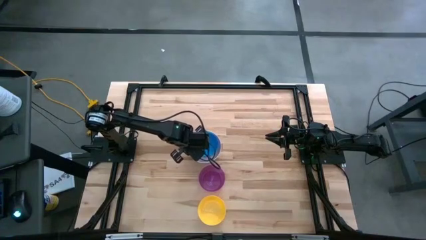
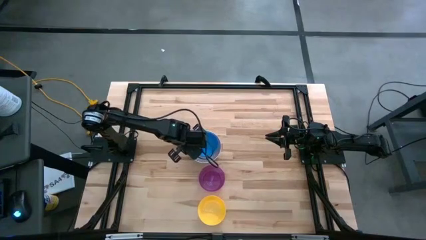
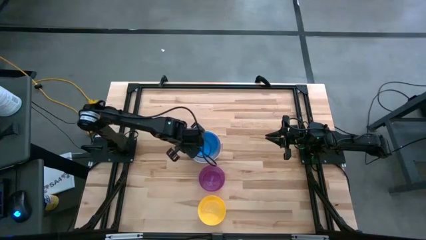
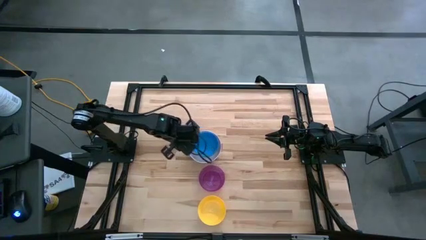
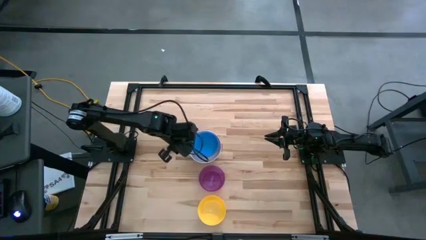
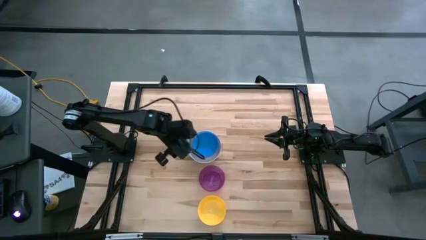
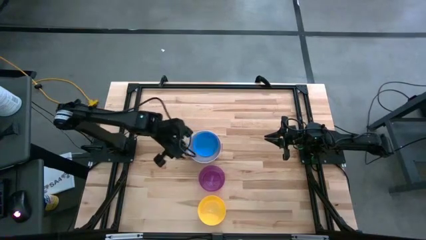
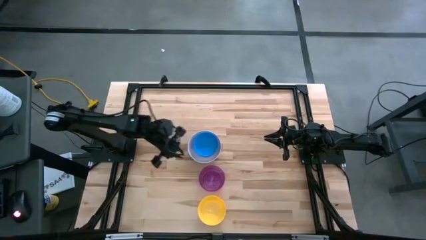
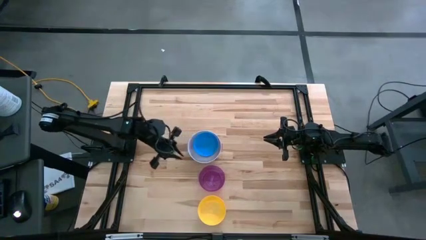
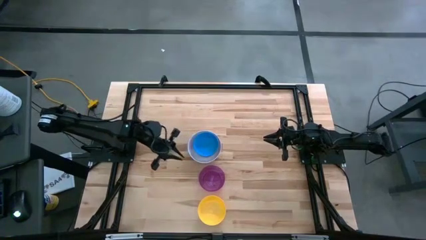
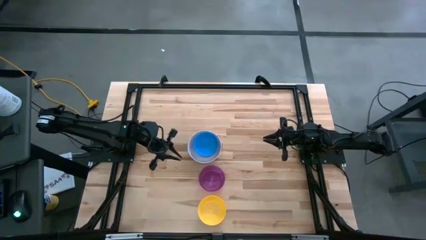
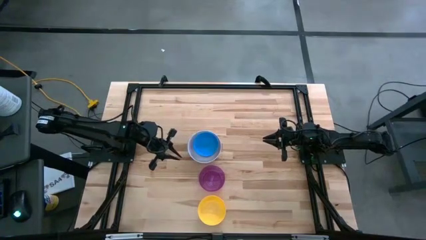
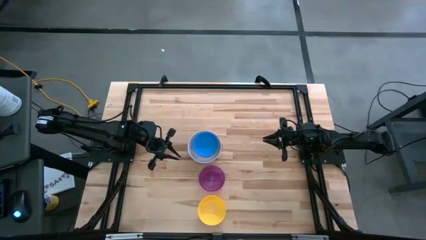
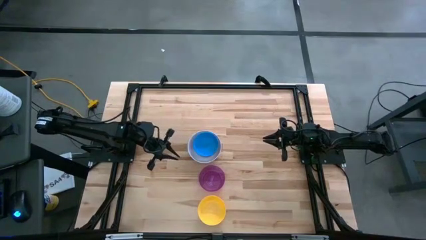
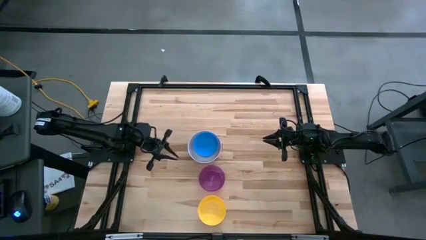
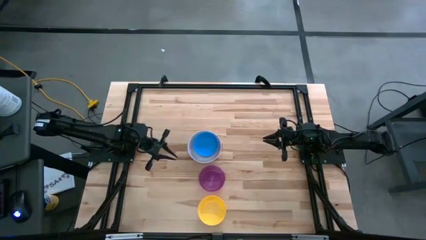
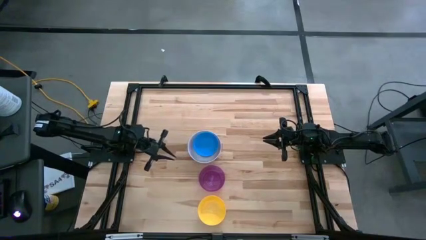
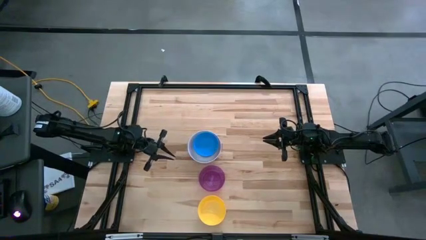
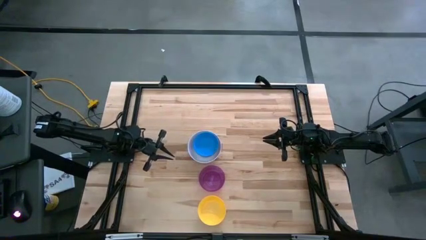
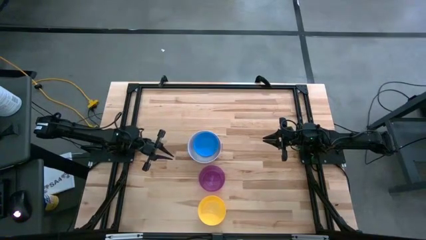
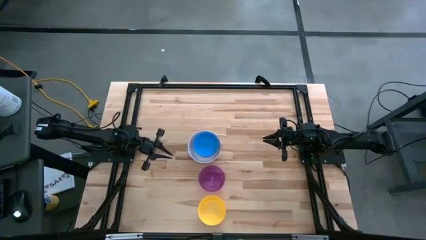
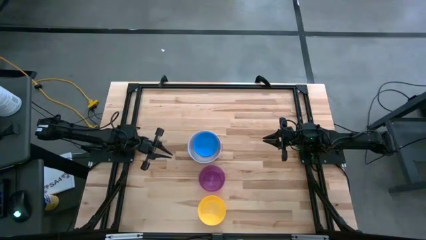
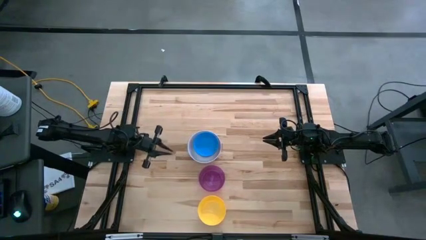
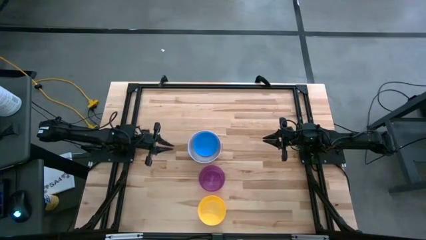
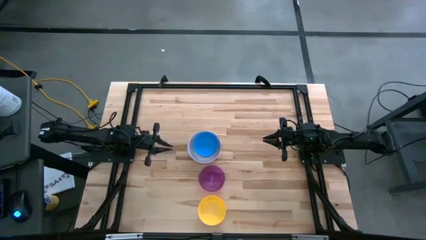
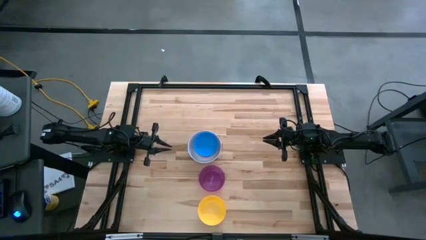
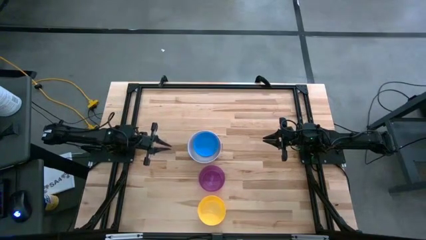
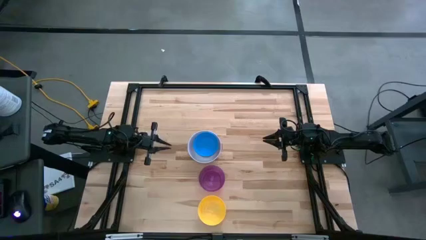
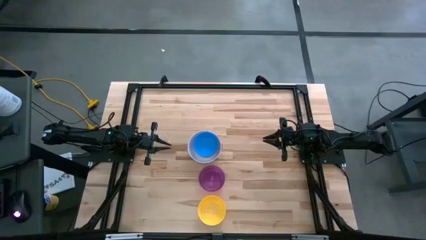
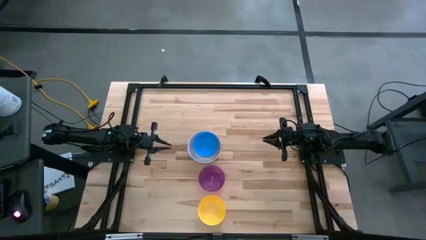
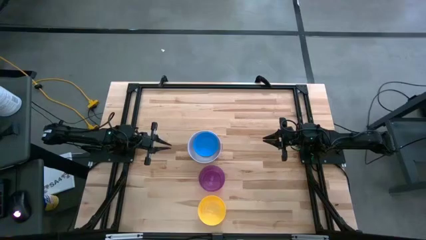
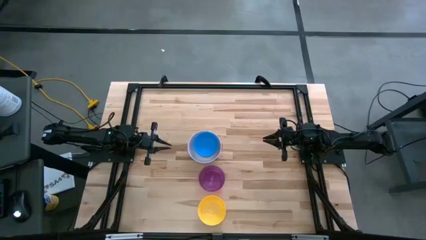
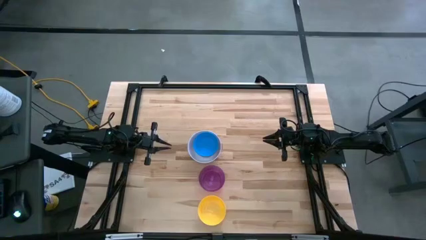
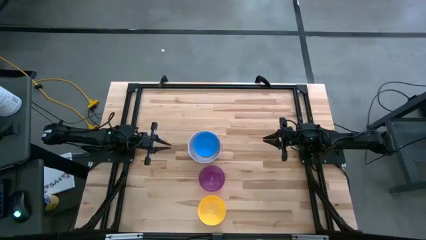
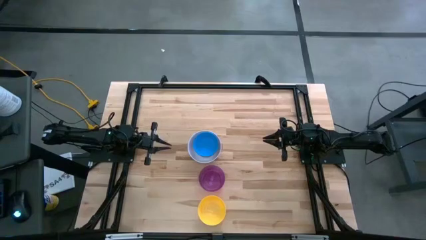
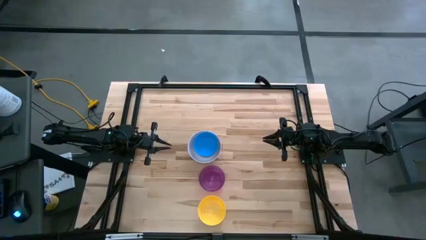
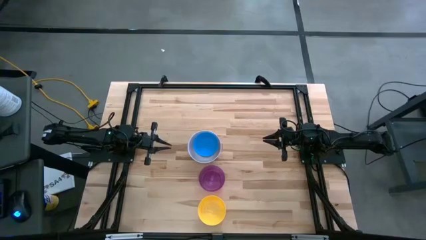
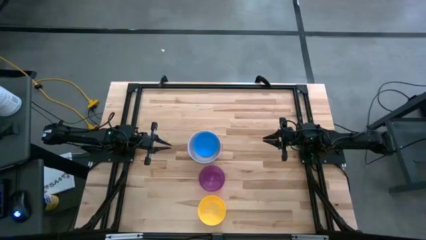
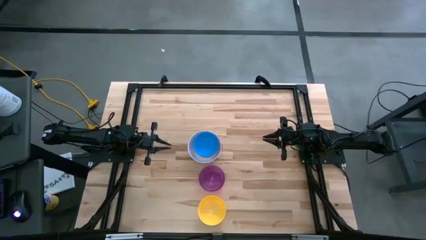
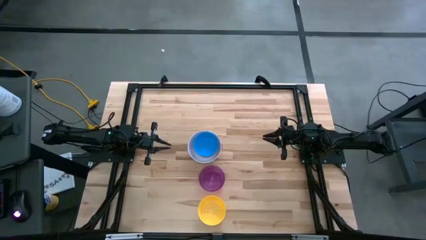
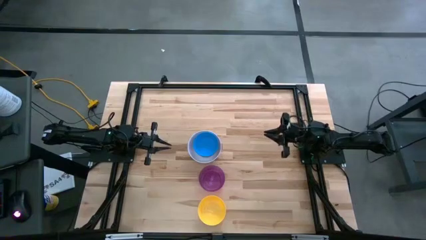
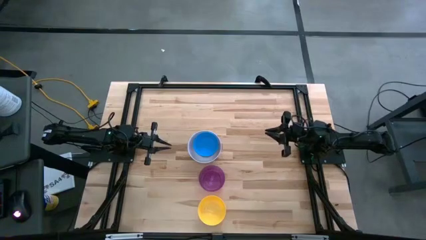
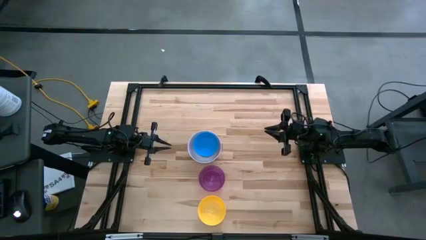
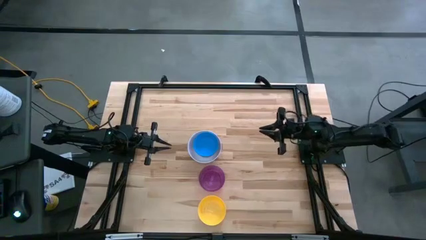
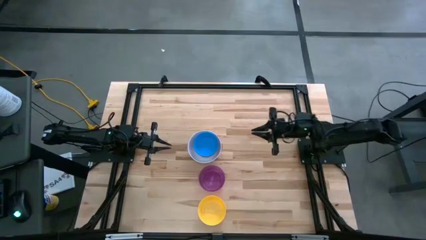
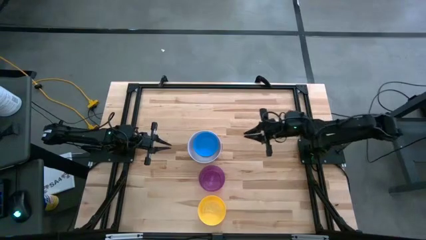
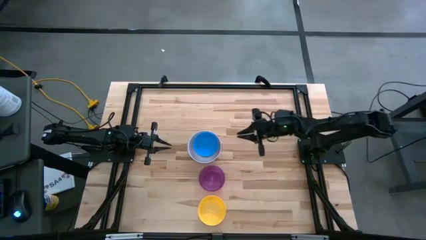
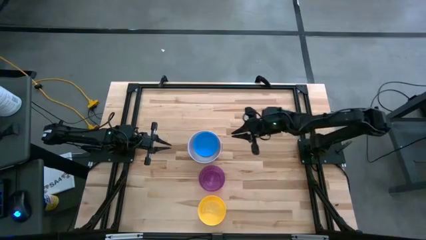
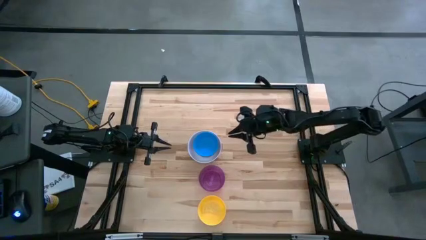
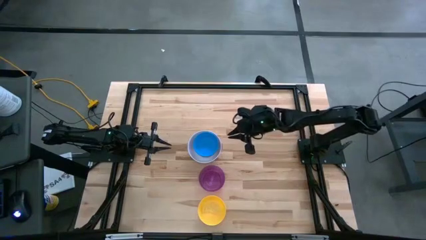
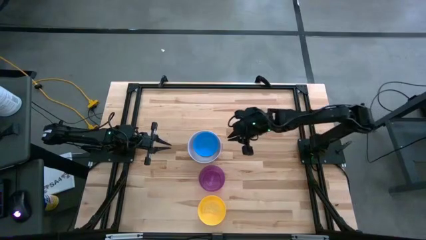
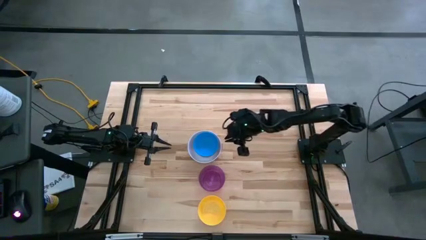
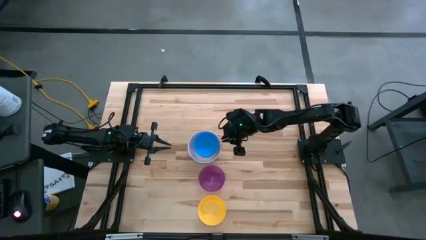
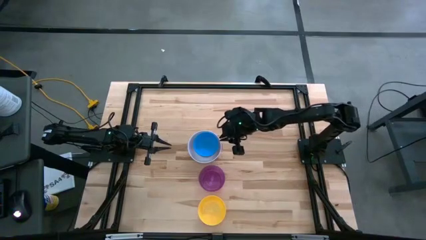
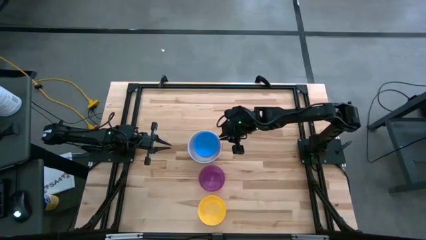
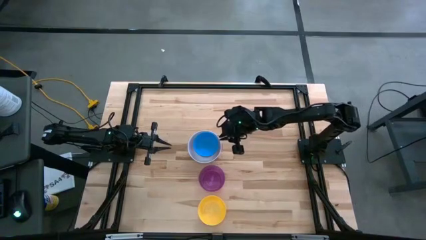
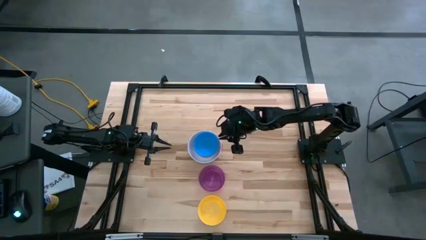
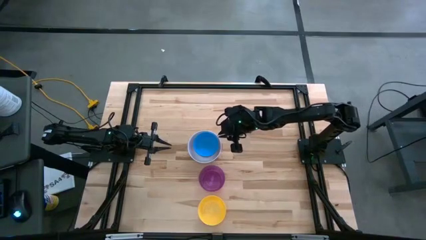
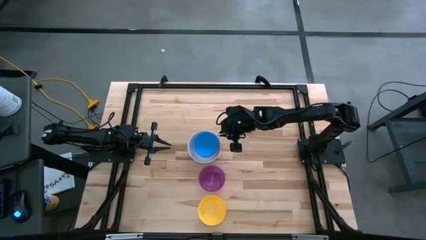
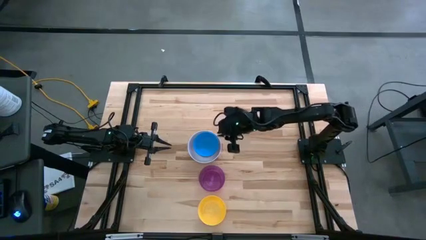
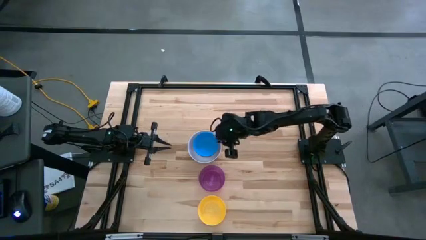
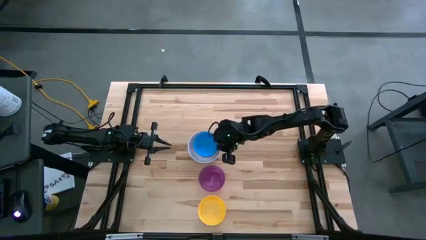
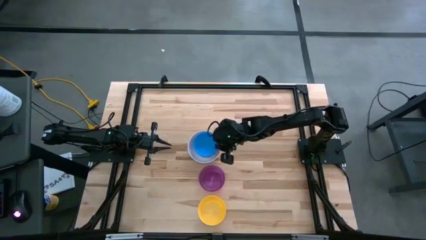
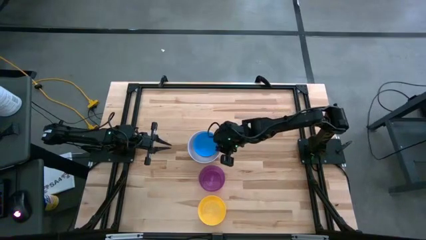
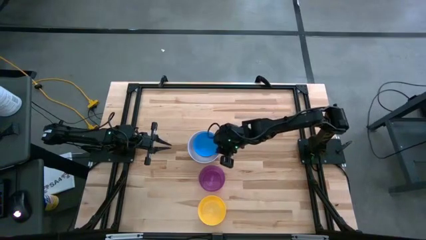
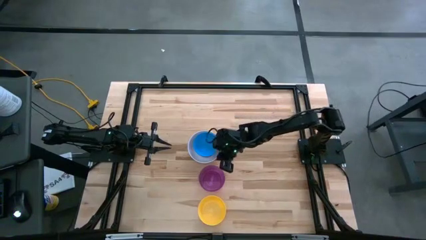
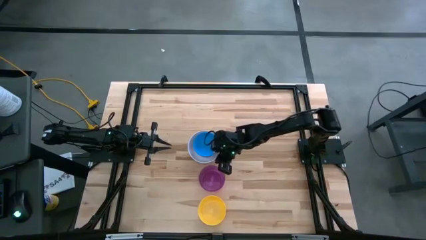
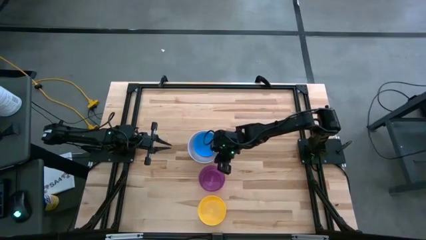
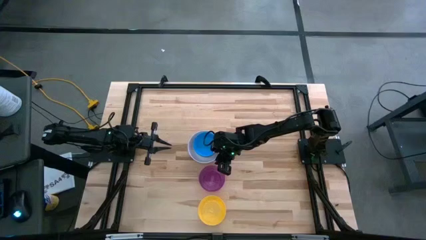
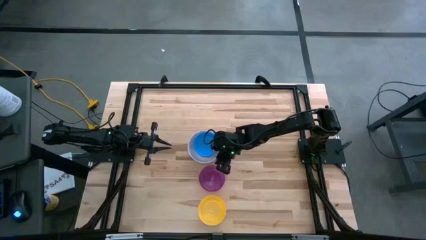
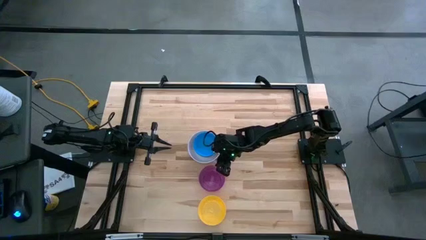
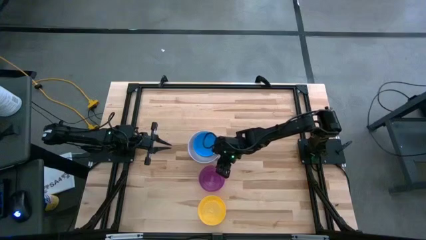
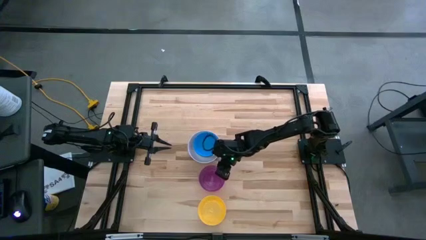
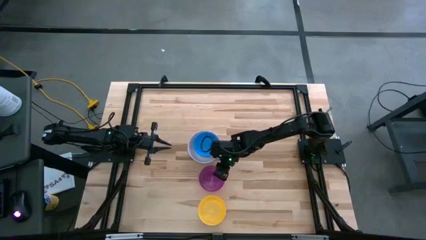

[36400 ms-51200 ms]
Stack the purple bowl on the blue bowl
